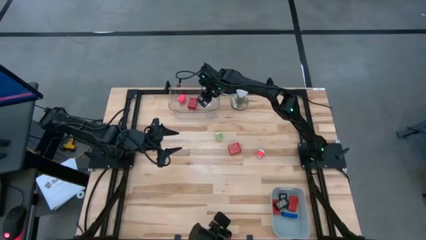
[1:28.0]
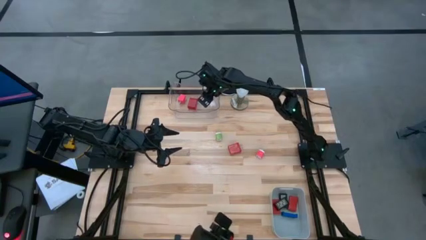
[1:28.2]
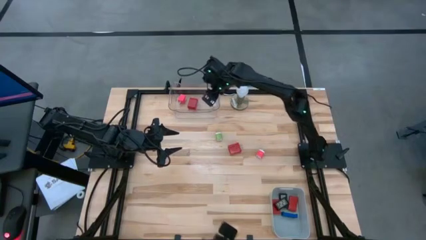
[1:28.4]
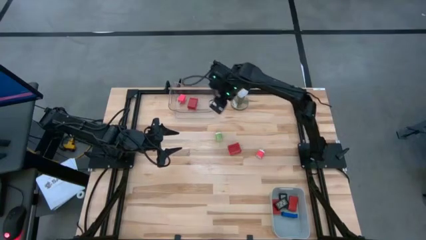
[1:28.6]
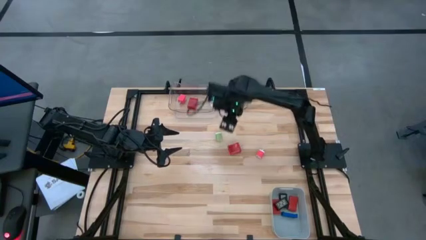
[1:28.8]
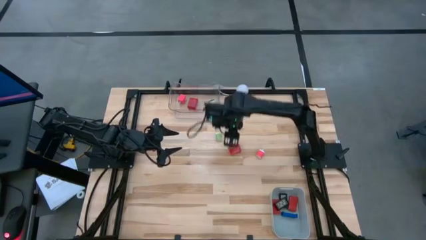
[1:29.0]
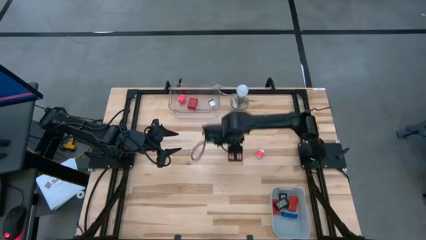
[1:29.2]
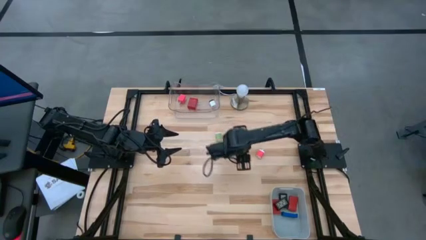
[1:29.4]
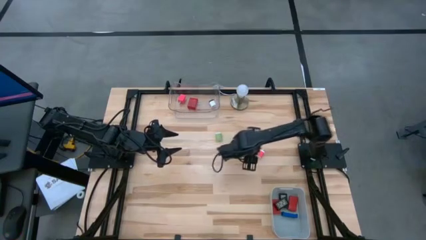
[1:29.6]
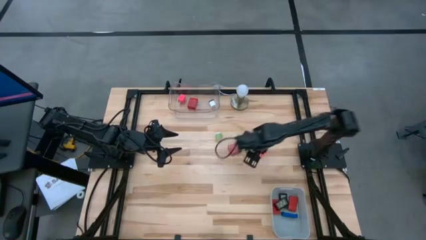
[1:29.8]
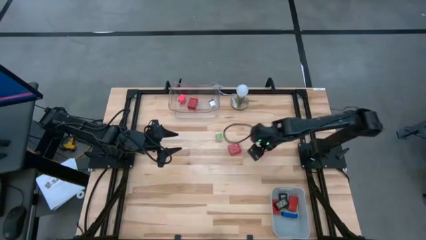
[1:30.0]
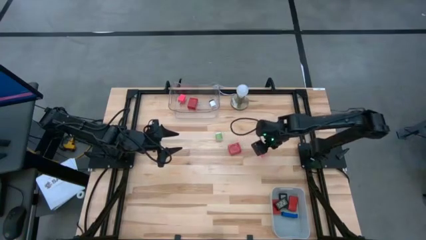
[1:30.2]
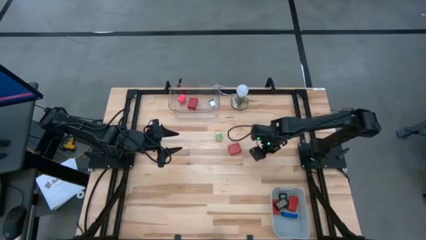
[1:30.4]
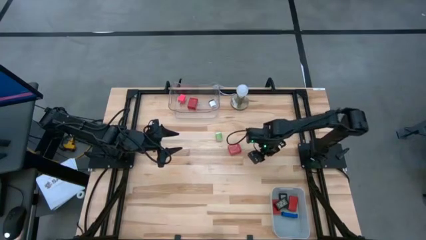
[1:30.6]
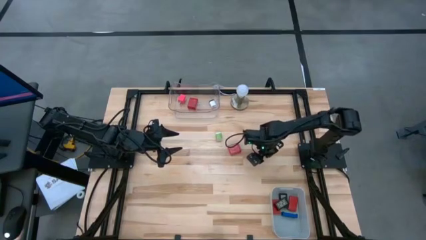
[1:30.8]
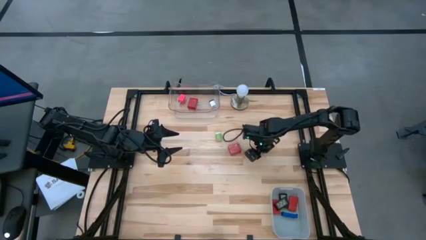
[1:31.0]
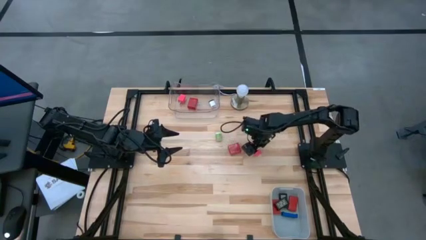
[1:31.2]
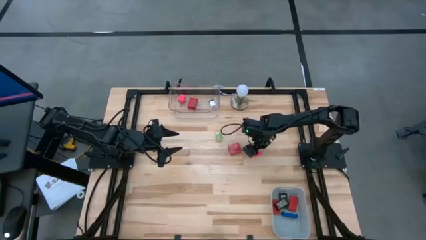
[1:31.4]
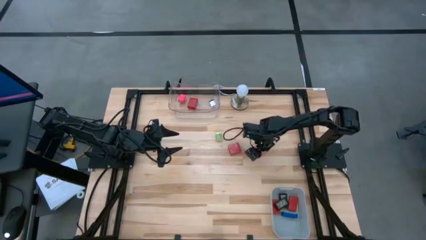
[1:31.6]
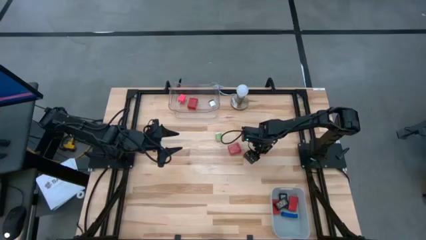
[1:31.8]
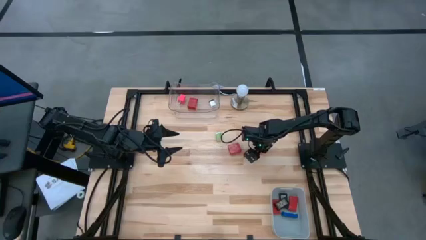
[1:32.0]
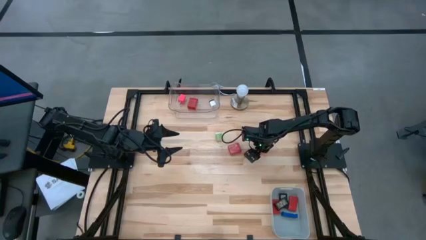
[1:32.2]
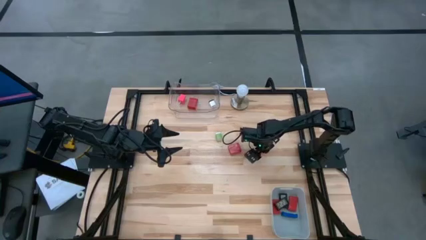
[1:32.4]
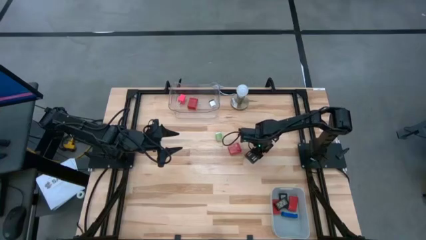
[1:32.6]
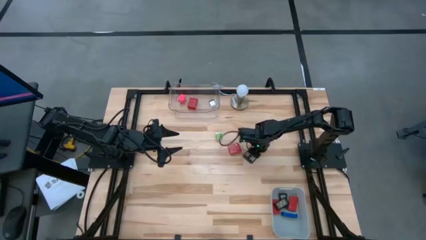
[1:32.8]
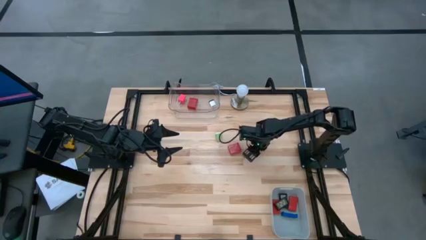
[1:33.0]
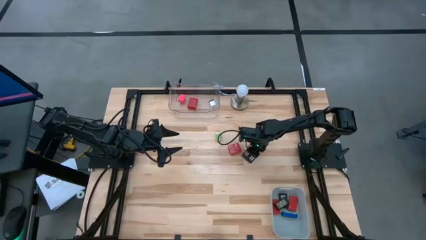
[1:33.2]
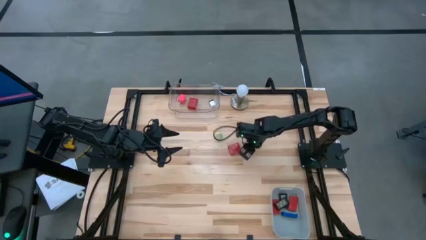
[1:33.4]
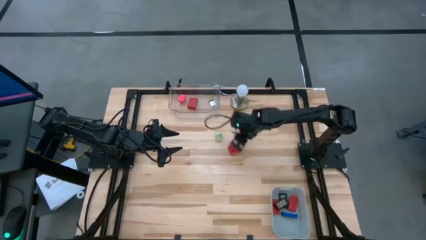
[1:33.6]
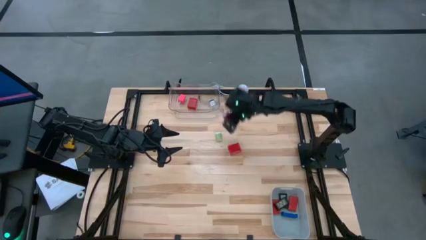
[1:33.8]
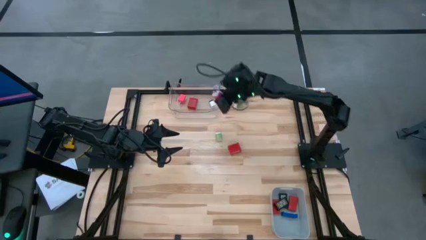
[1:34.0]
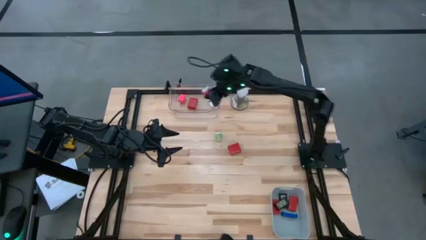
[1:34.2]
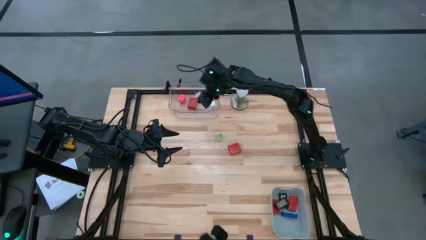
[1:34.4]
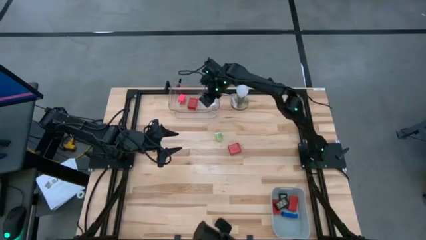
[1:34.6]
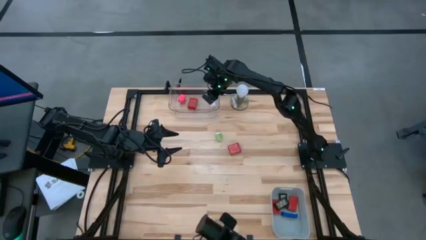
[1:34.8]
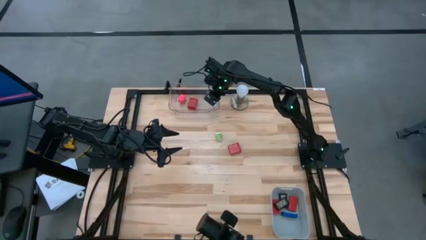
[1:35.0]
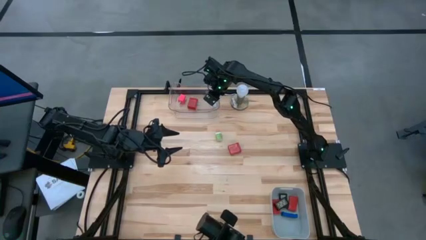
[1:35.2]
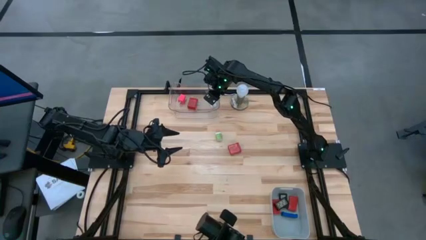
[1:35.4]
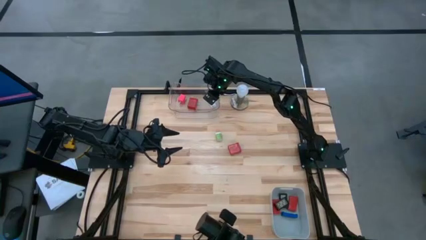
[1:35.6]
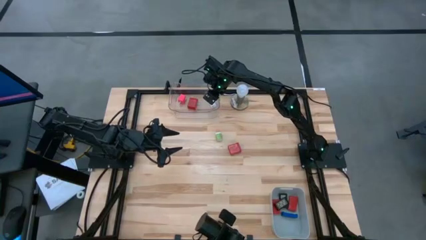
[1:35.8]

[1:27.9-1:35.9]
Task: Pick & Place Office items
Put the pink white charger adapter into the transparent bin

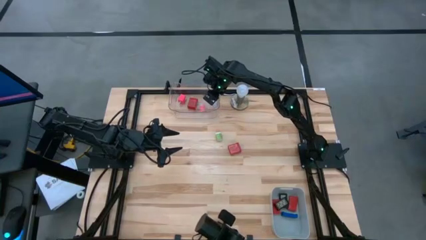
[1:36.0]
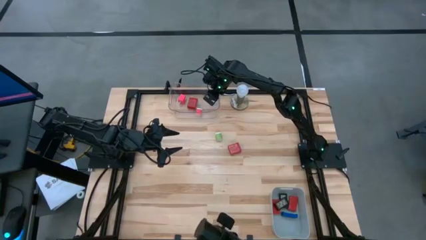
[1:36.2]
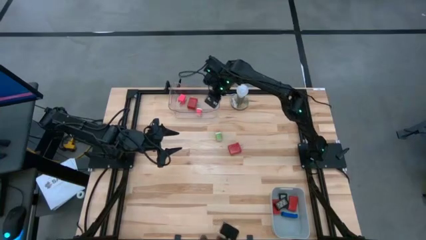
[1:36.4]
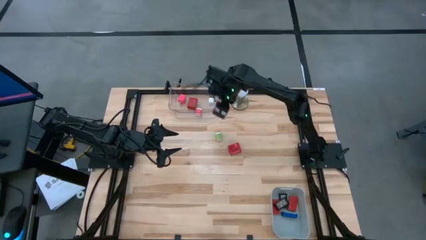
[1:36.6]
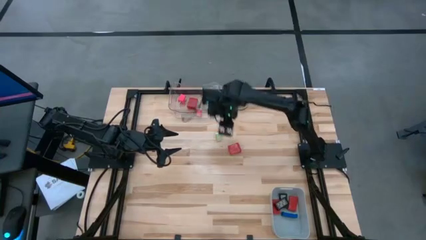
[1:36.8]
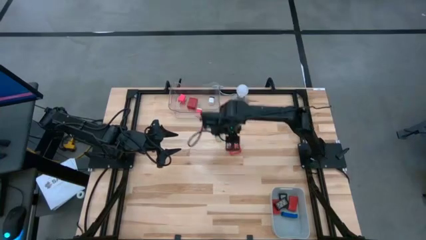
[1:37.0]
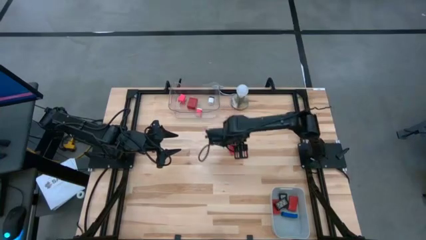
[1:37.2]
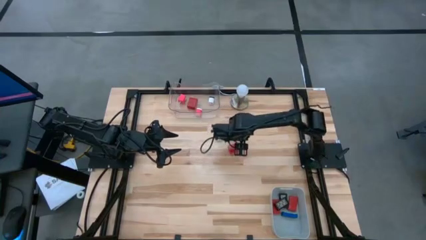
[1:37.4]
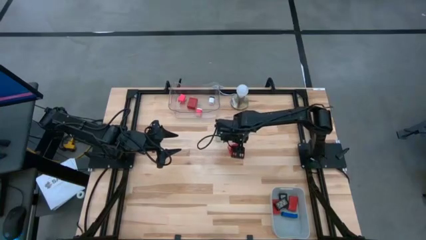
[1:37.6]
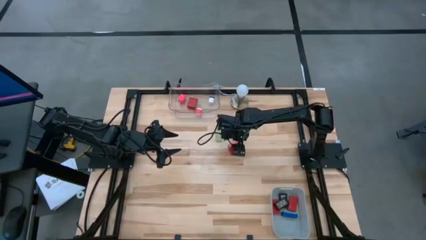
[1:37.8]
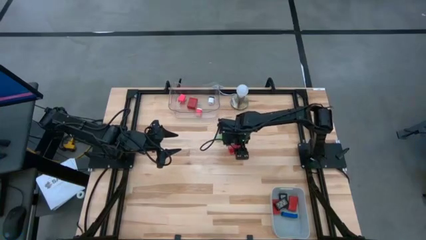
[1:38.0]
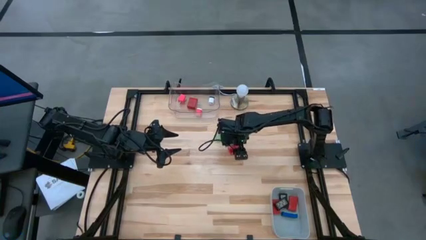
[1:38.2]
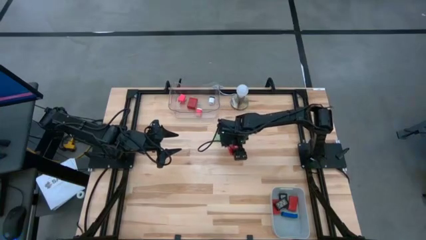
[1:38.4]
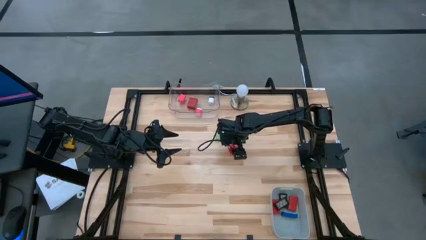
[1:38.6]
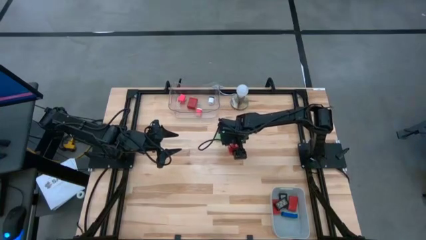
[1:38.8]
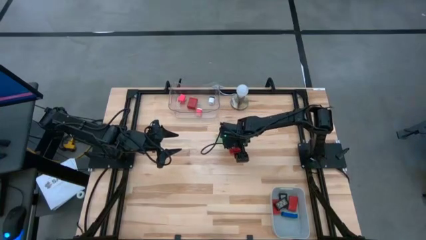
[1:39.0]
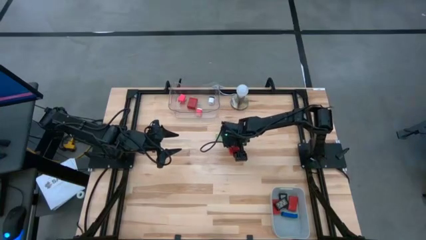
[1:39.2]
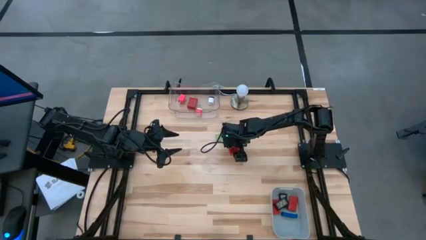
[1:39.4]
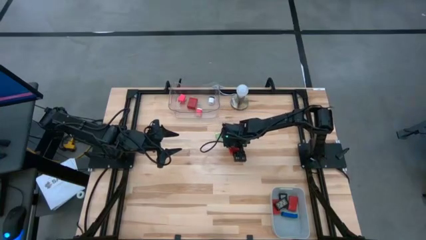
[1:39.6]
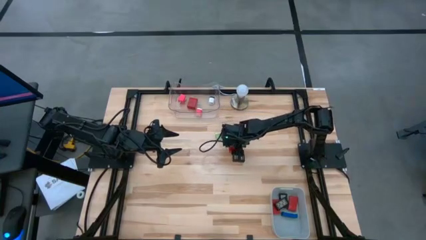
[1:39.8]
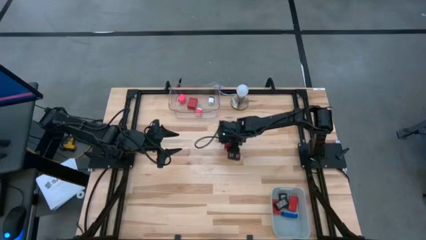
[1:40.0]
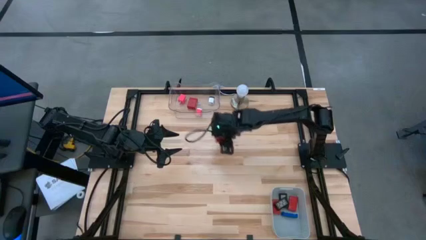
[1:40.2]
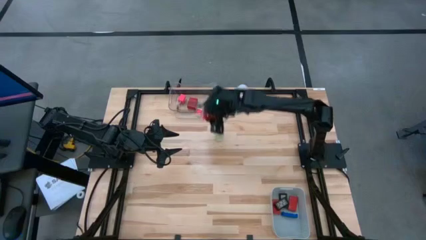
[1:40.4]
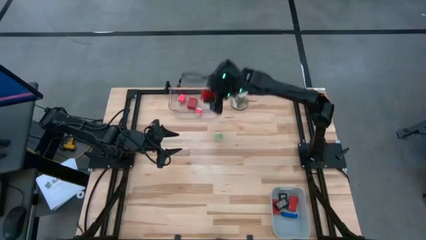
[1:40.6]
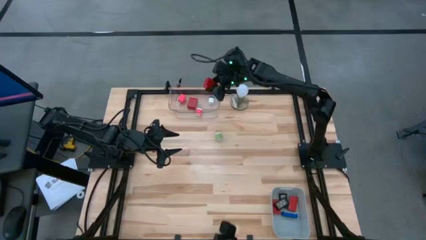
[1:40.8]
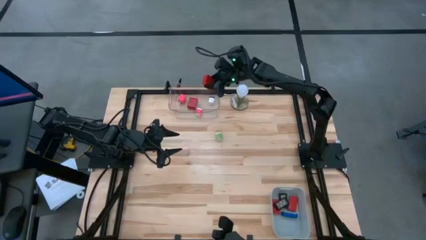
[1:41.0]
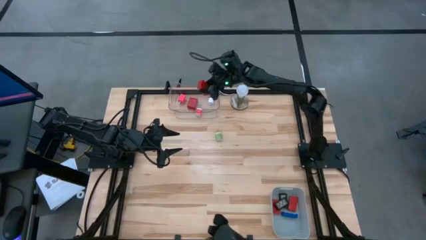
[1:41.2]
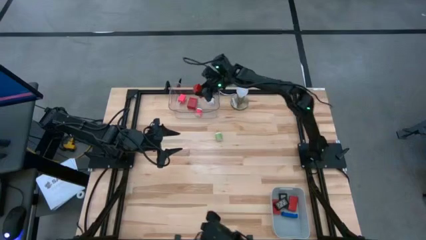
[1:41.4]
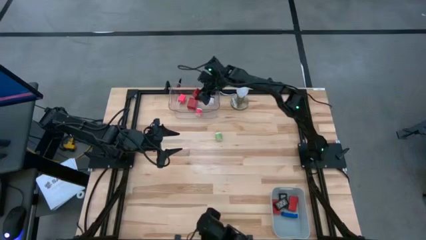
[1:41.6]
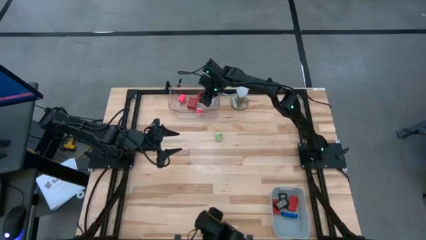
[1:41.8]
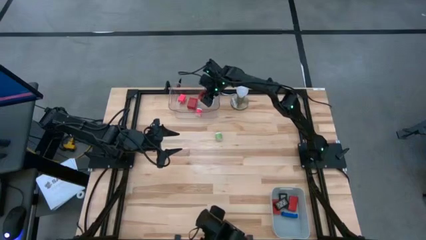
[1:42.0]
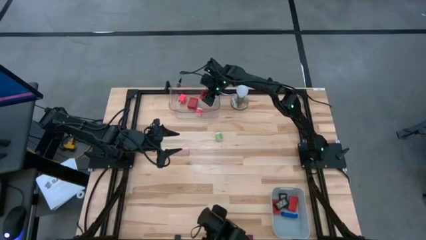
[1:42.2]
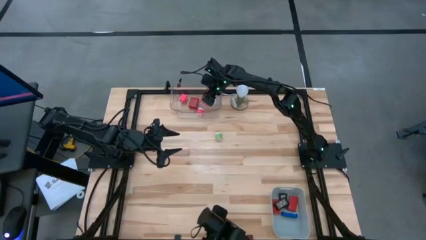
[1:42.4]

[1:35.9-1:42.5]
Put the red charger adapter into the transparent bin
